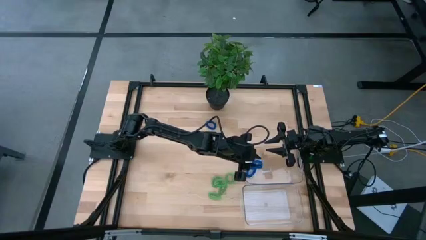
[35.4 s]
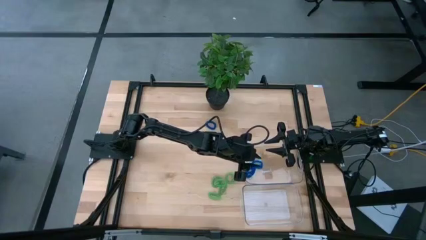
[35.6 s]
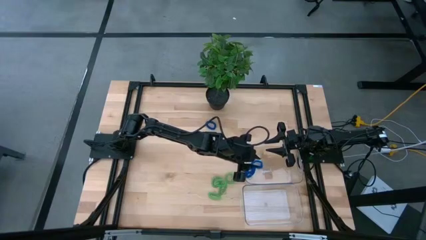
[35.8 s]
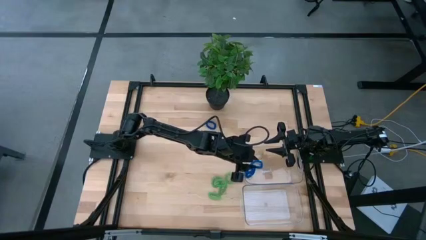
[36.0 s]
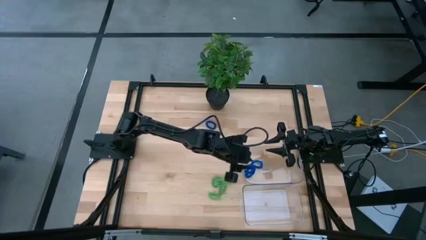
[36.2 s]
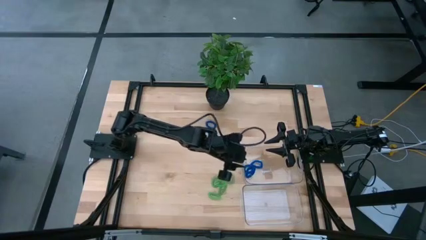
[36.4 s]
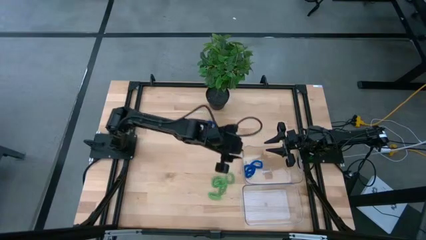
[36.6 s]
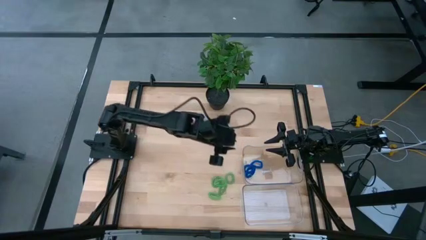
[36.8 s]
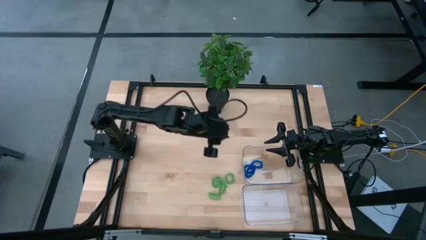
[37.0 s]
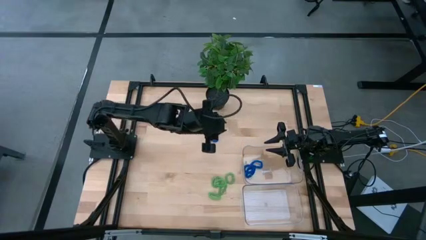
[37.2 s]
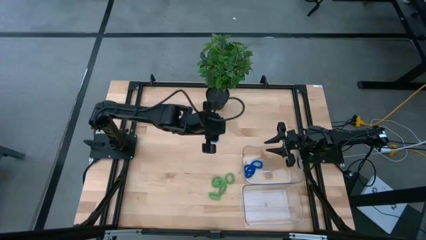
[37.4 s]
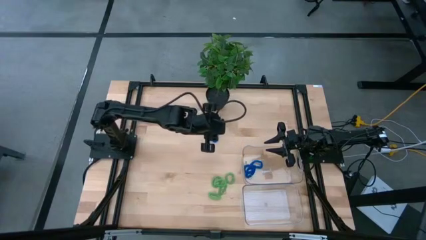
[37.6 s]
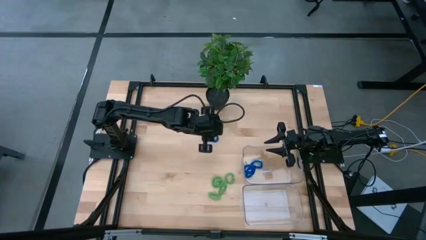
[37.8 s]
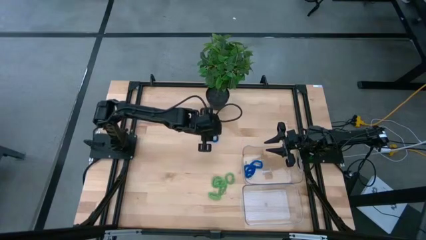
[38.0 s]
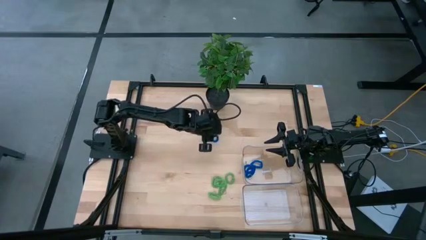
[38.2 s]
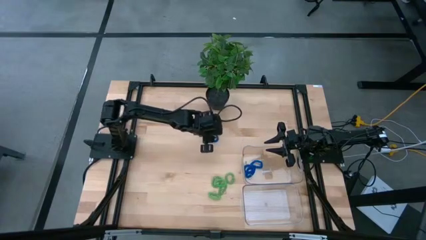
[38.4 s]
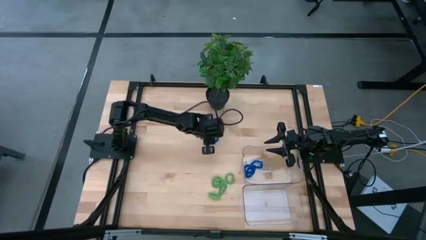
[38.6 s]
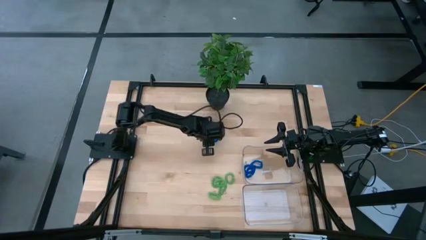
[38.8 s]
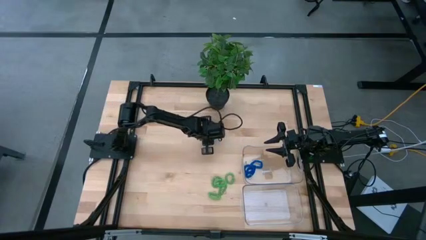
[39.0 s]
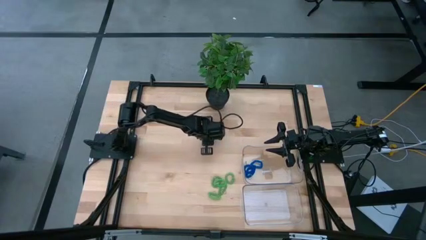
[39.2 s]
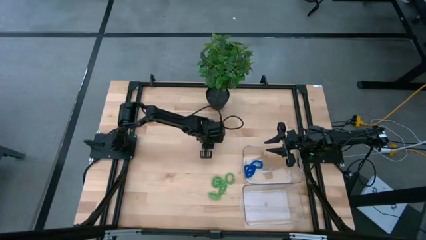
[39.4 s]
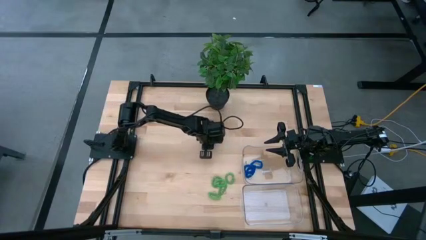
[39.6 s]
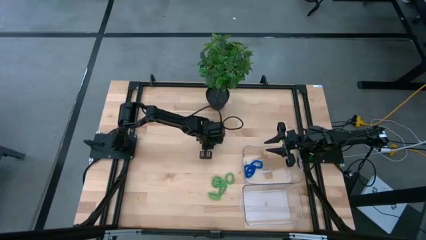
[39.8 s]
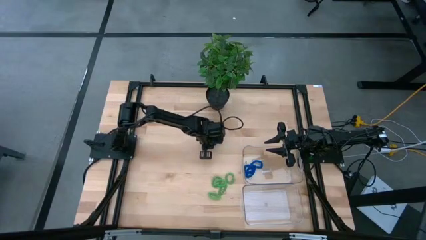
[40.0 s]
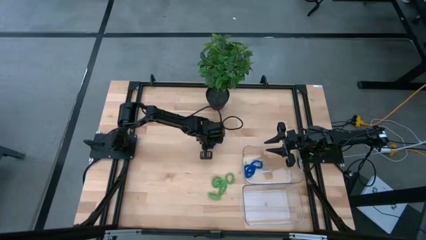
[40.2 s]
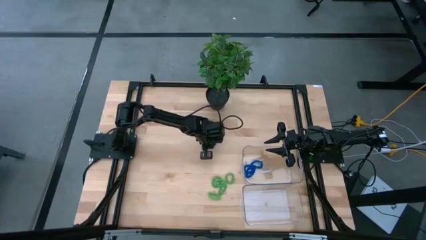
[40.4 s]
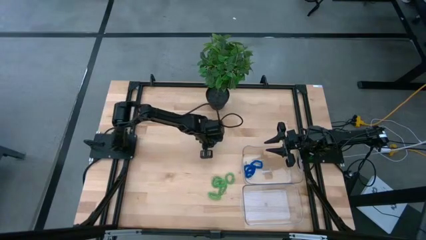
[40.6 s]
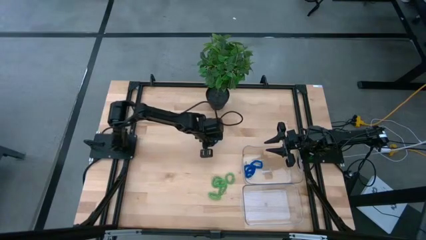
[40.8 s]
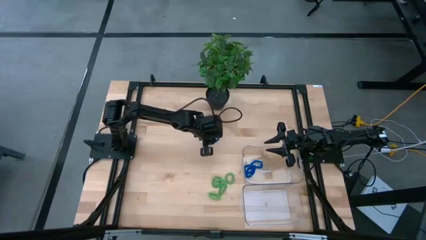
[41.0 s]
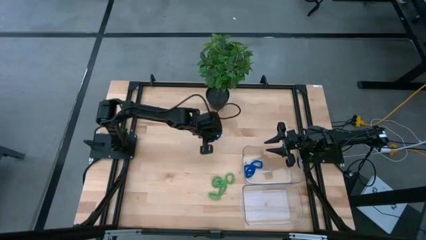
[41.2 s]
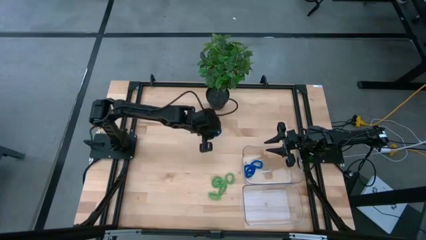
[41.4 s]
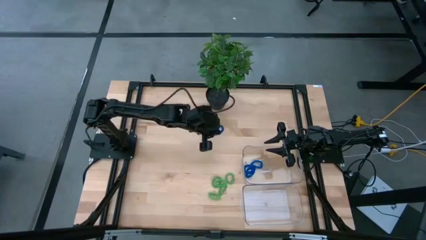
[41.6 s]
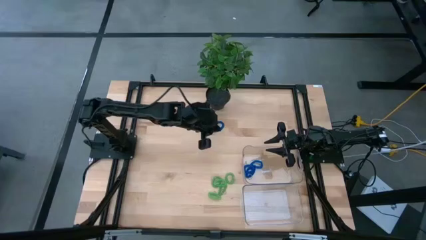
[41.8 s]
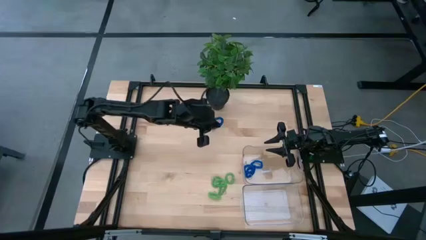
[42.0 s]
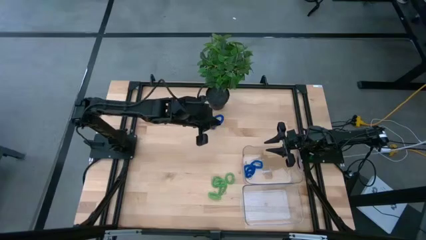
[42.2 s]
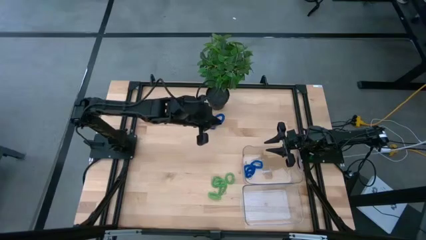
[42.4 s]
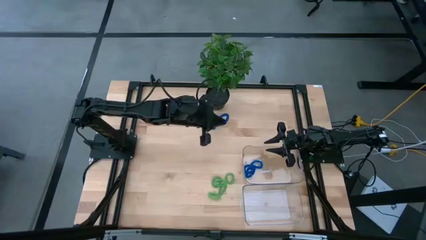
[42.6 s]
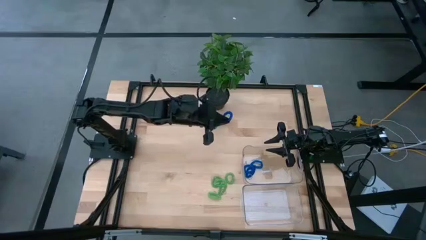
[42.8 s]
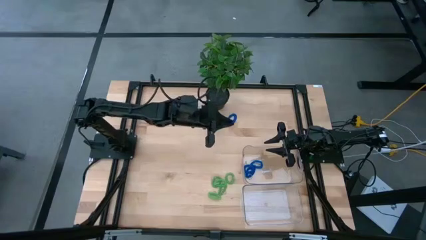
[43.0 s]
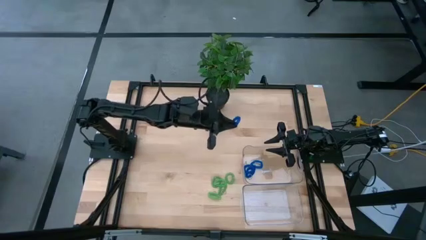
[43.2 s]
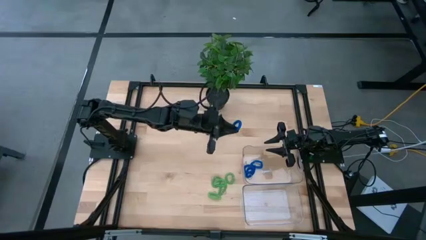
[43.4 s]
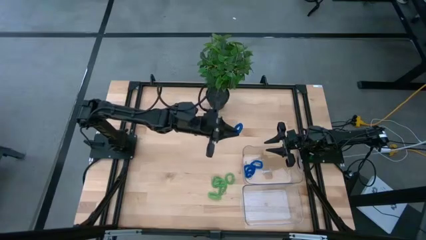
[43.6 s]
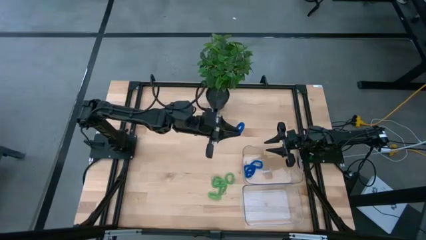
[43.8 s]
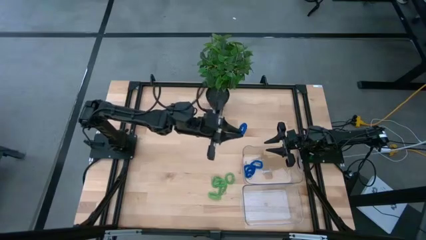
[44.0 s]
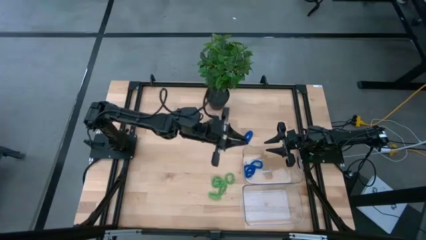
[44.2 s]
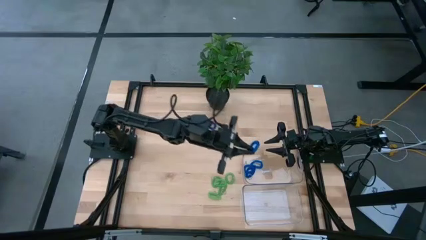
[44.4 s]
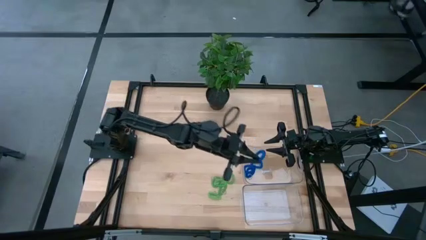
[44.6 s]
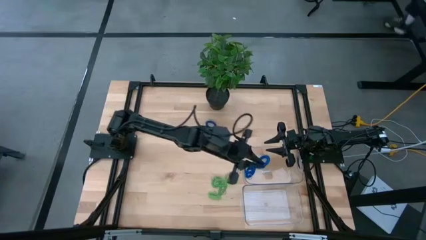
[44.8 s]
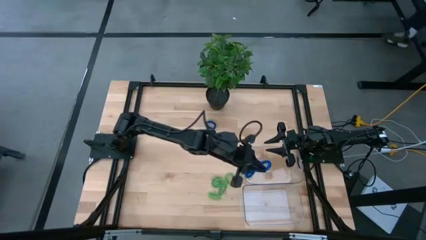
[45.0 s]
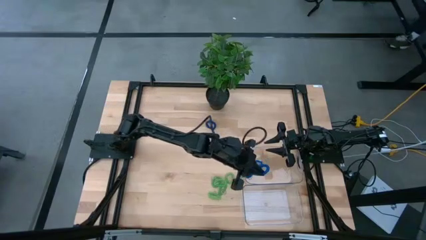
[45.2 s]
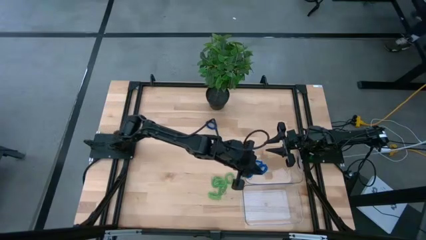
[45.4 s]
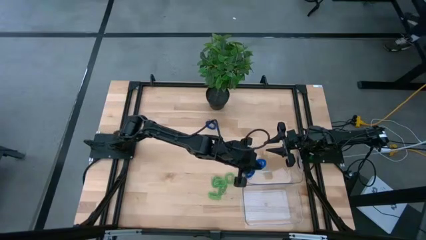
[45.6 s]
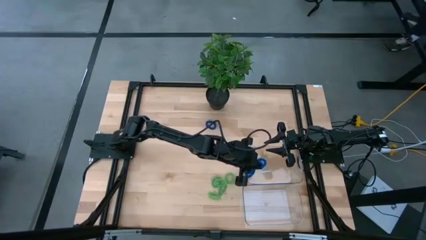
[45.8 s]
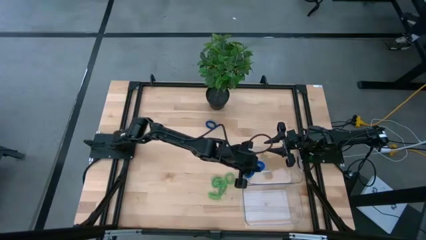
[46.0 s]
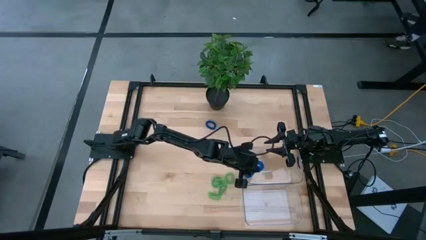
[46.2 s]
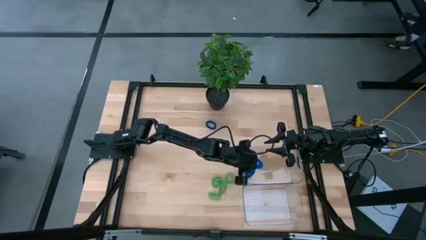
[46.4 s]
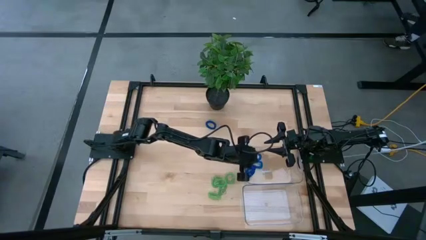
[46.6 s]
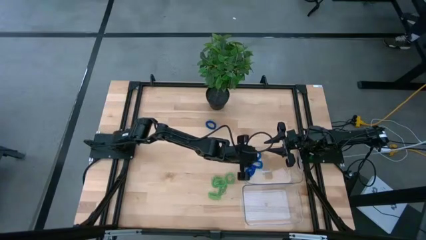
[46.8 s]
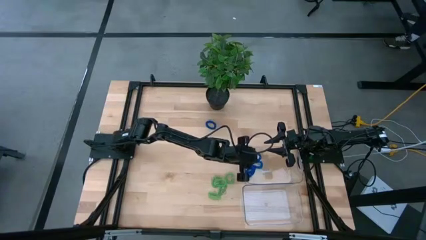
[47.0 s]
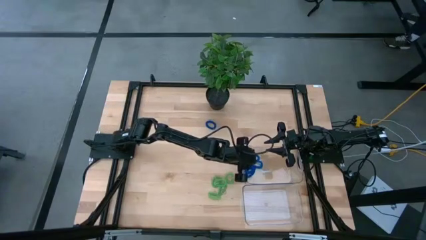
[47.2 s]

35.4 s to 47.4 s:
Task: Sort spring keychains
Put the blue spring keychain in the top transparent bin
